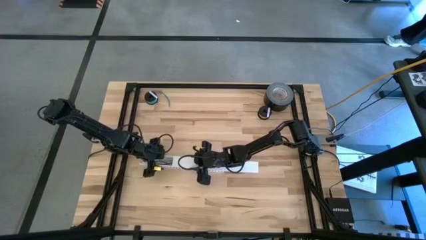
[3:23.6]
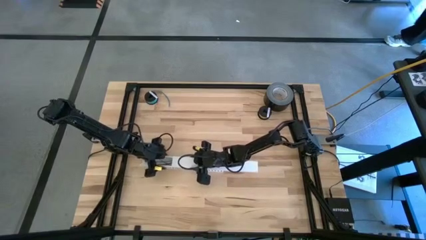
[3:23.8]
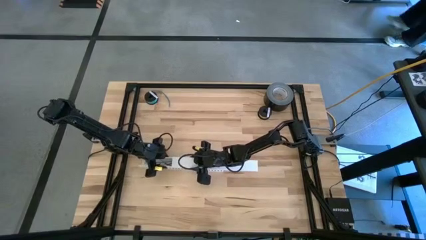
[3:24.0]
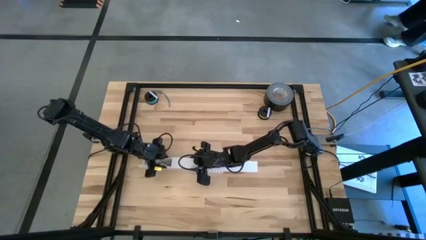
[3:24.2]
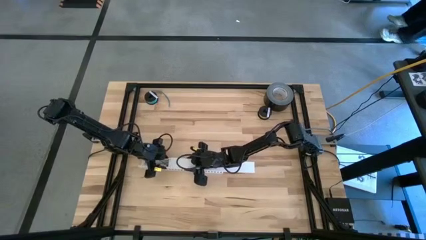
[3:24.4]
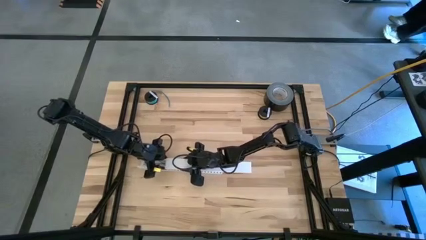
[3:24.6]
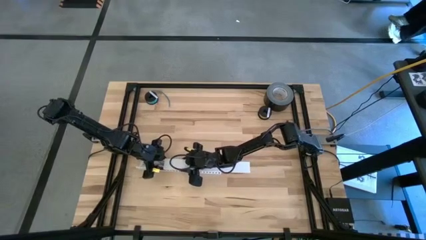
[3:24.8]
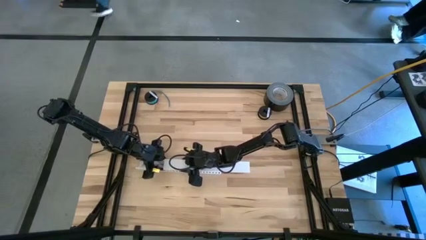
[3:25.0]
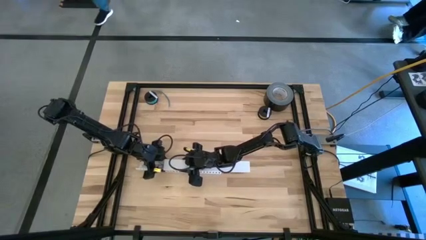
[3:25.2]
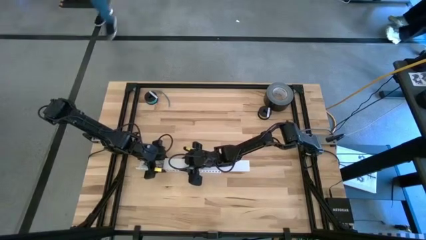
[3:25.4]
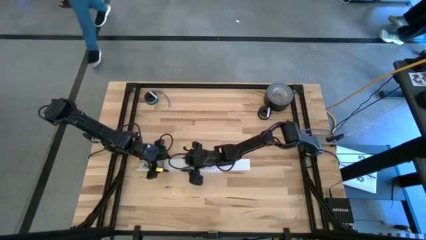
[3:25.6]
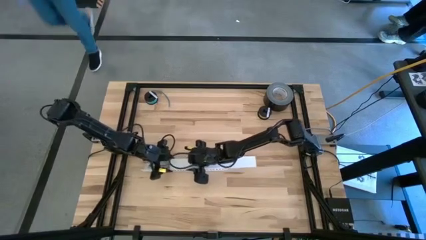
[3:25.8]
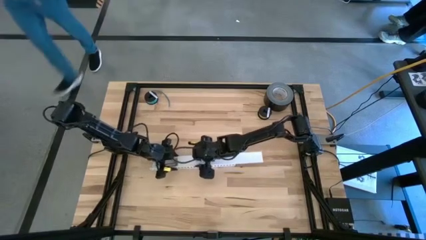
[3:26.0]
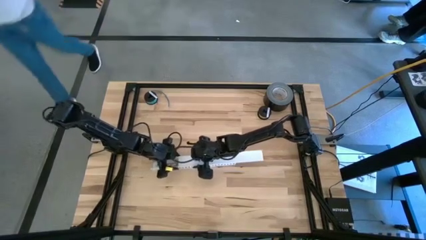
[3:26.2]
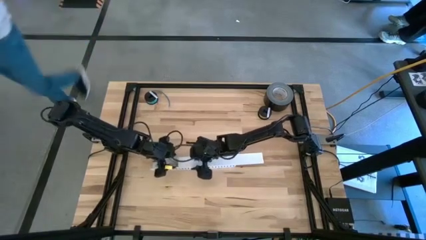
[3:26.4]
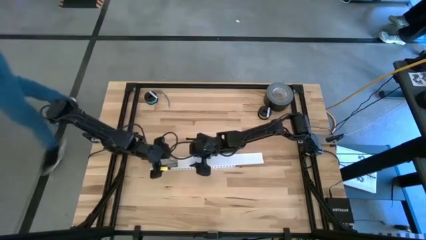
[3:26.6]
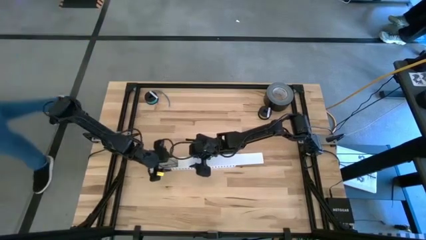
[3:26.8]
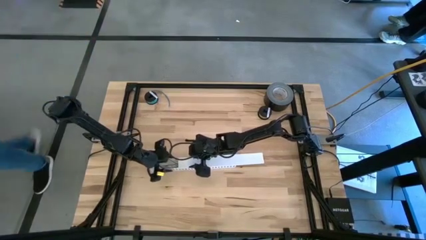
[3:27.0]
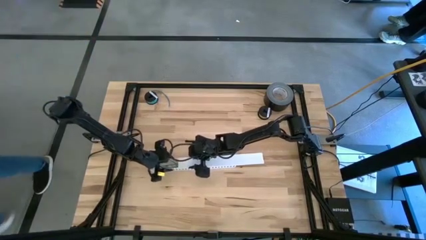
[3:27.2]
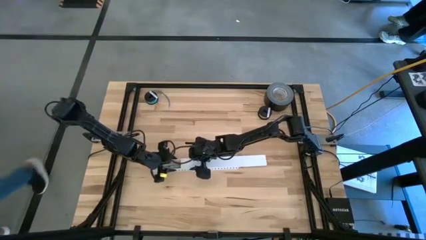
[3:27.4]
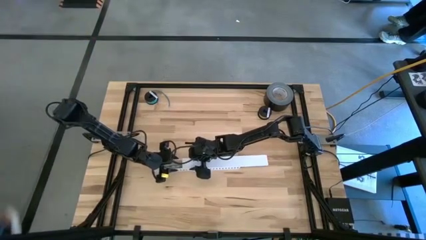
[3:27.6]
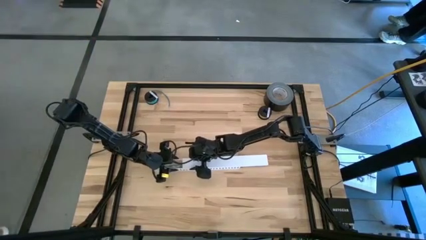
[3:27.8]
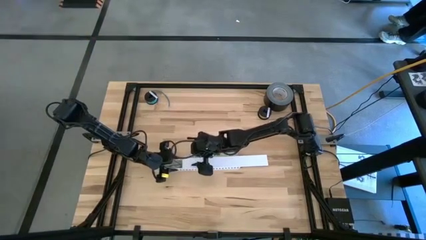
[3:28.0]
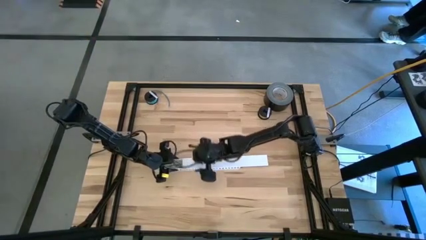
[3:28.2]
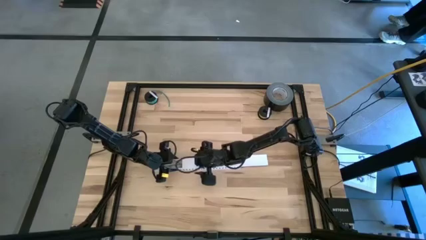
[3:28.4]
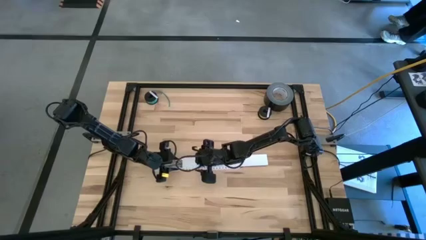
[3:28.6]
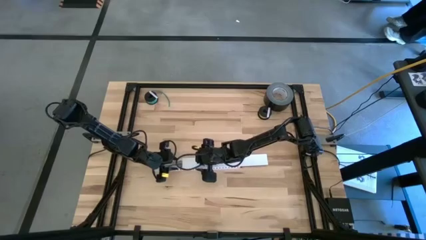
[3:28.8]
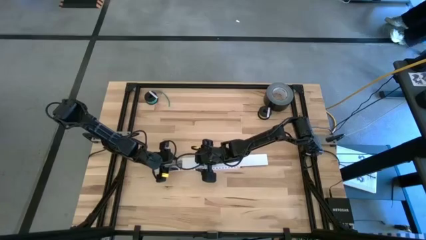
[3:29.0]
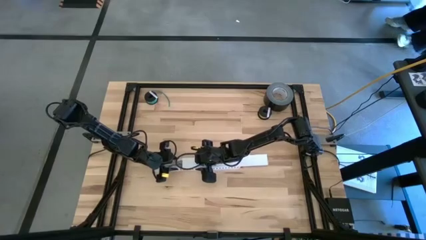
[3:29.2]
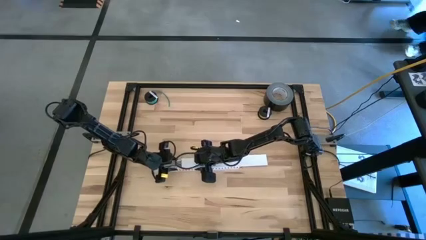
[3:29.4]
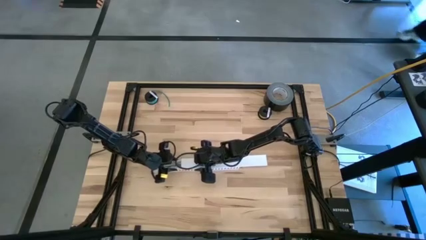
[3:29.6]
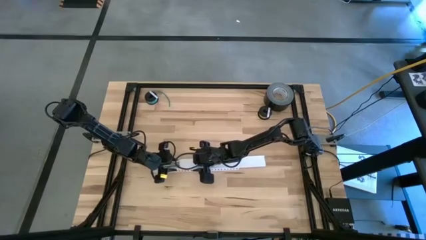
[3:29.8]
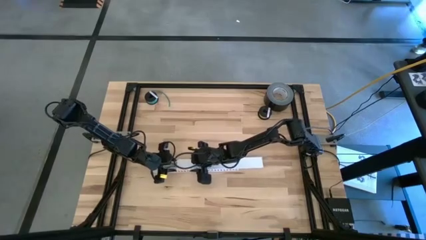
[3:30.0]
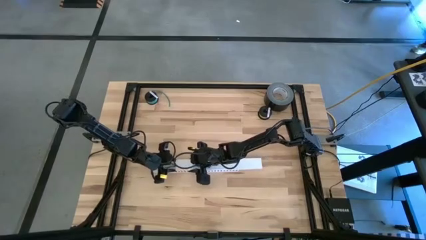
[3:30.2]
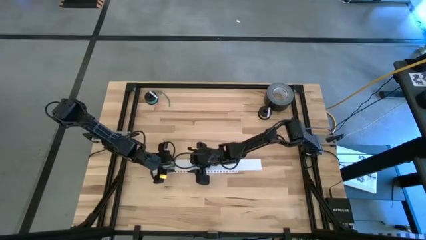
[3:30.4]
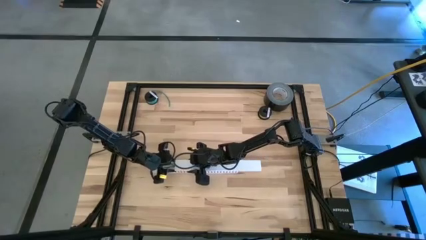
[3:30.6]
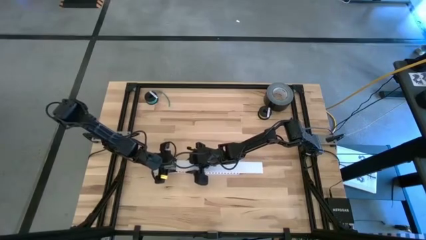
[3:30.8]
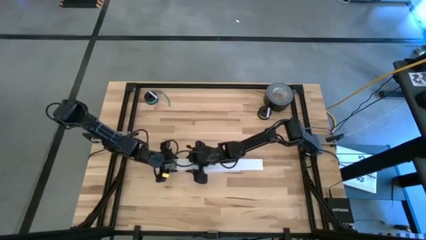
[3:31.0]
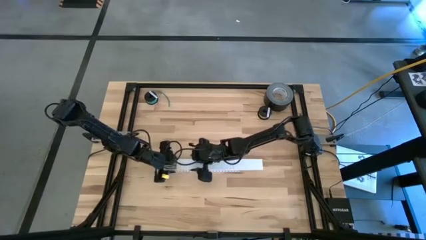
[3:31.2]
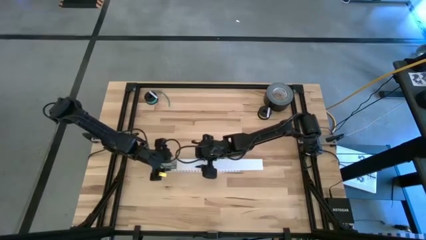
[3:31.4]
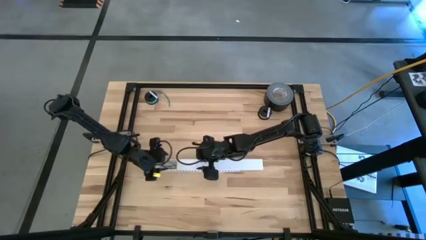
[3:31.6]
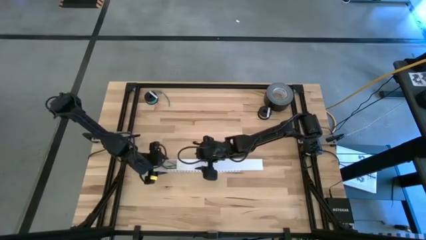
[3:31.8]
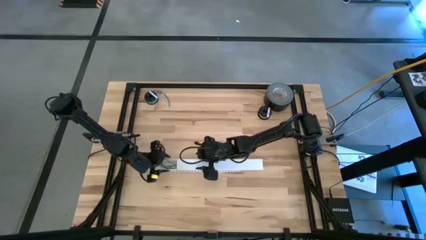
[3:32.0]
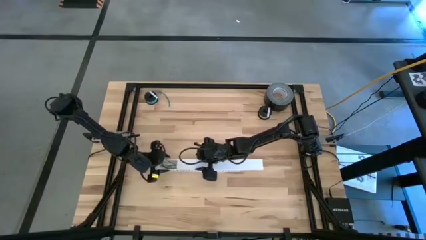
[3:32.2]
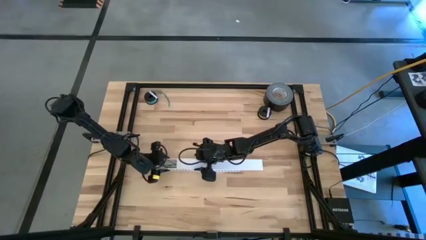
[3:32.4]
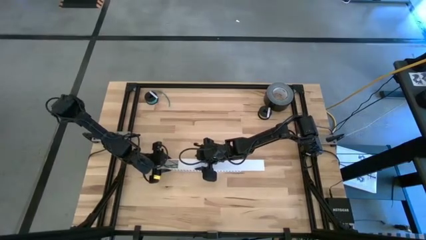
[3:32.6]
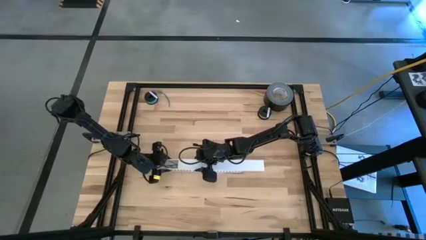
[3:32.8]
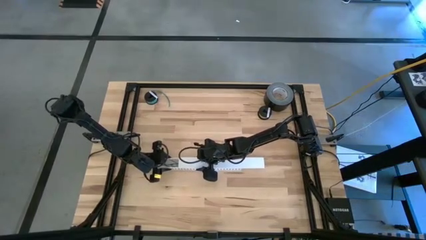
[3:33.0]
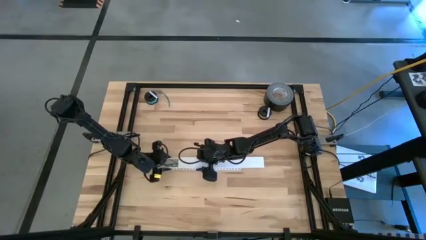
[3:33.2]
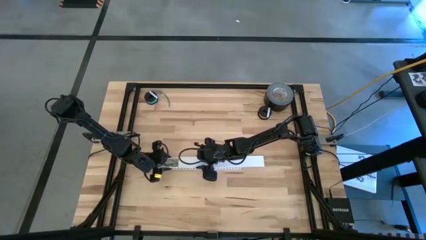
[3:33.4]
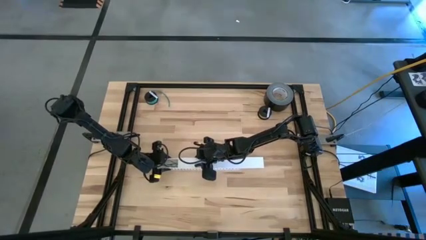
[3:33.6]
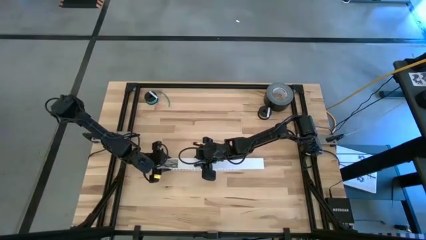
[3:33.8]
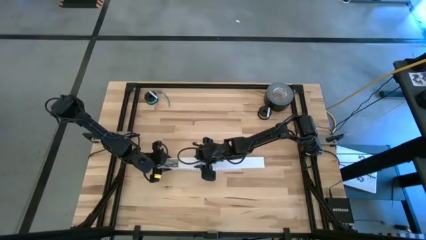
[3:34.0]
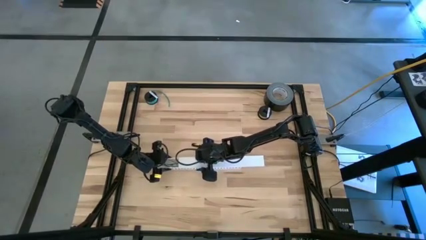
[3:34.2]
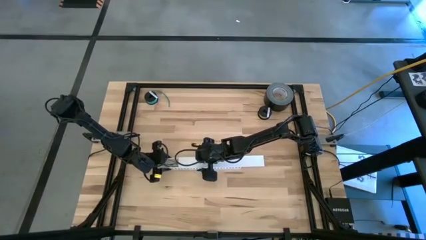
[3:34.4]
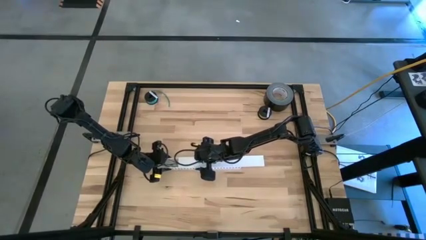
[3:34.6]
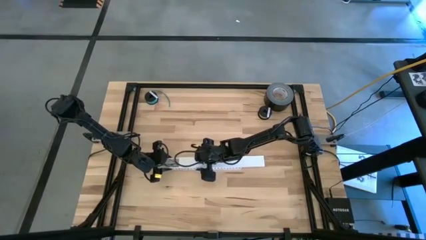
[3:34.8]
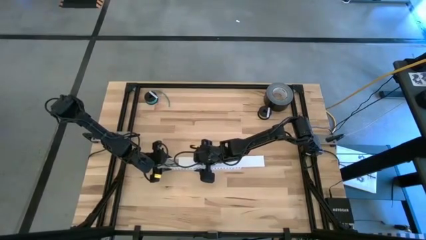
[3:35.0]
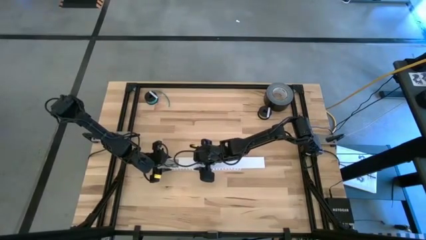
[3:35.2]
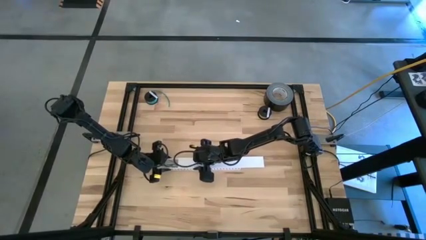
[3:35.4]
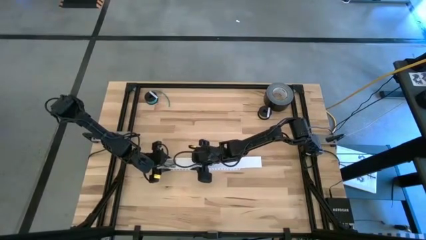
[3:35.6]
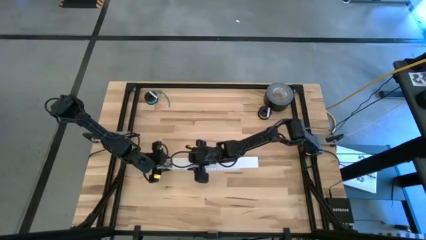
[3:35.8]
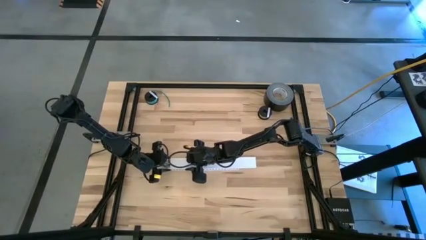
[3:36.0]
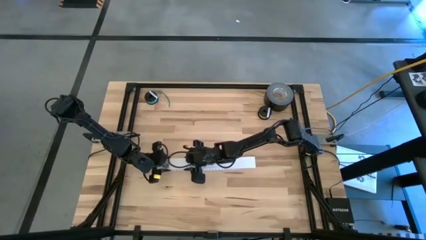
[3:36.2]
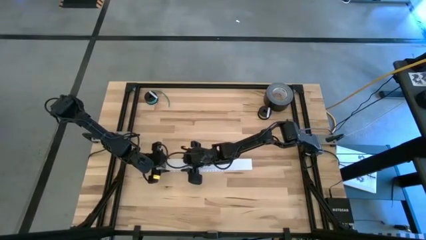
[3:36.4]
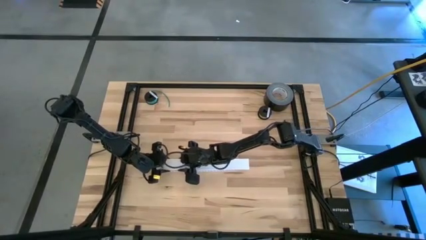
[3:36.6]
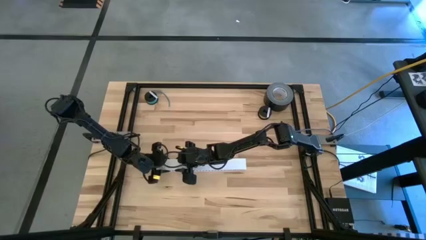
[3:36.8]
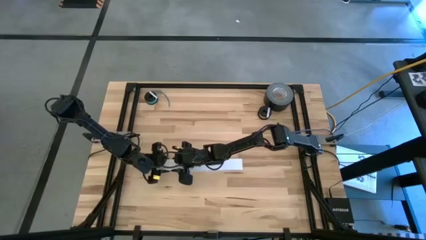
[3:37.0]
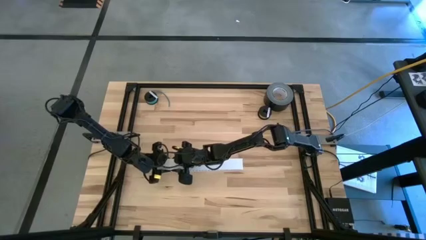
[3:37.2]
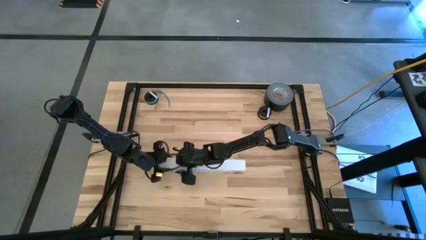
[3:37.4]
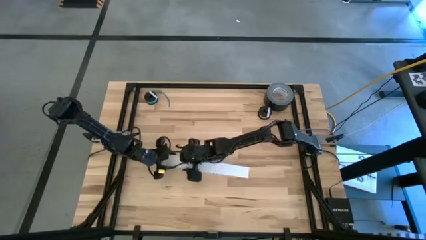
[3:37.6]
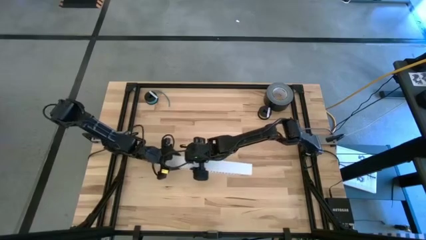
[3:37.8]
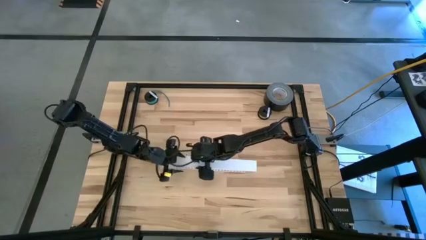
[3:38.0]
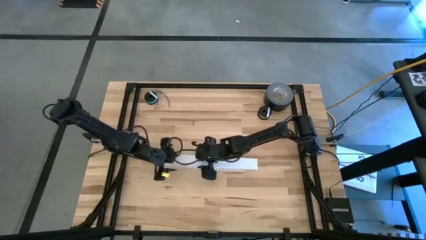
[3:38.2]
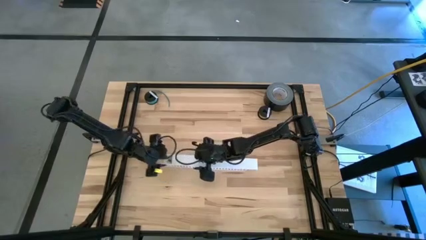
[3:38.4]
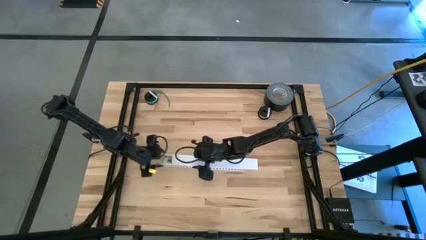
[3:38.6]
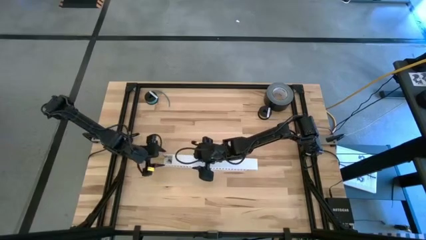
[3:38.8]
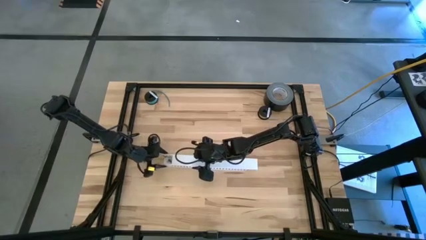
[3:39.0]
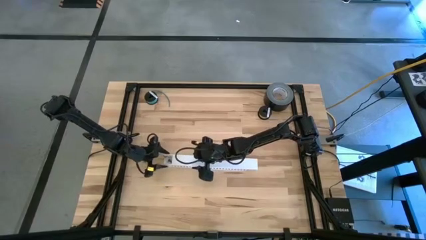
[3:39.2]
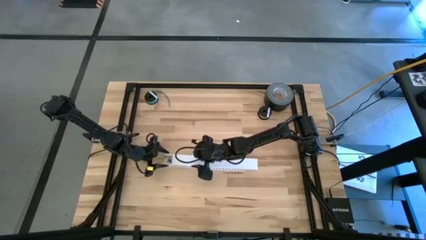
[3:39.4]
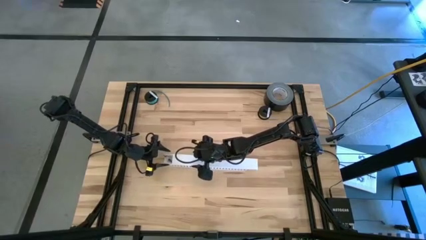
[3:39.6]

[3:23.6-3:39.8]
Task: Ziptie cables
Close the white cable duct
